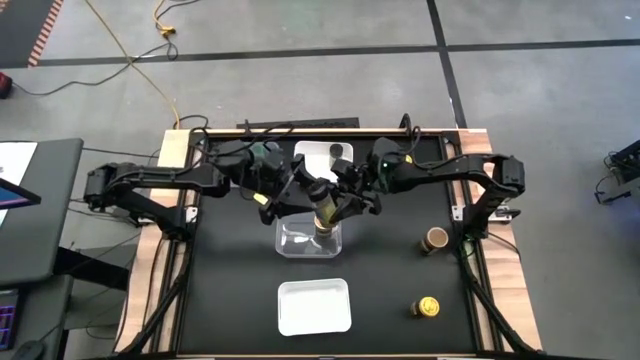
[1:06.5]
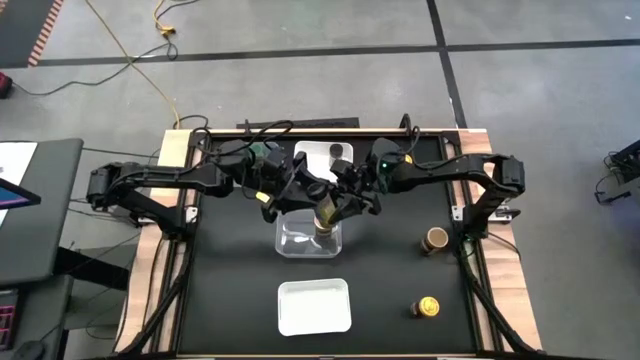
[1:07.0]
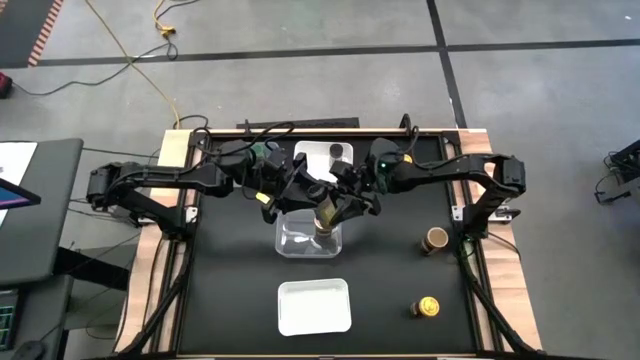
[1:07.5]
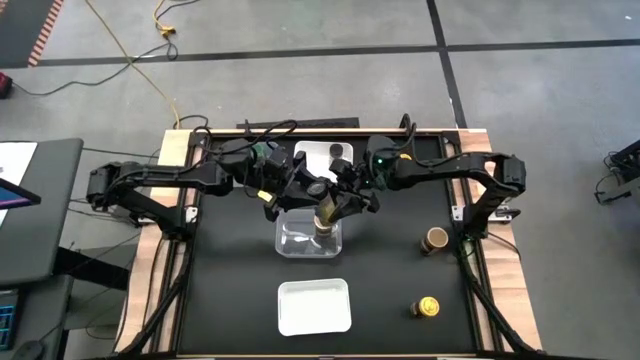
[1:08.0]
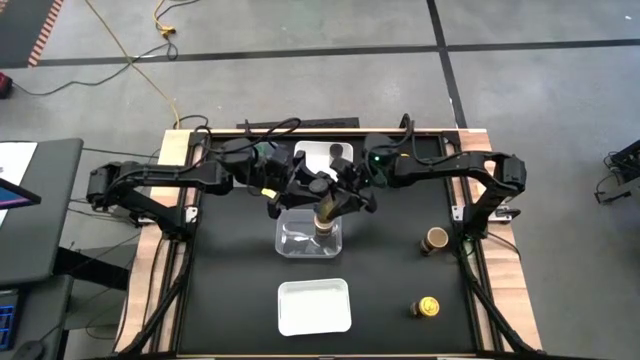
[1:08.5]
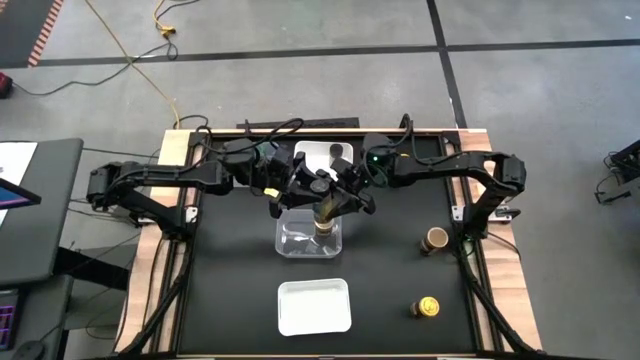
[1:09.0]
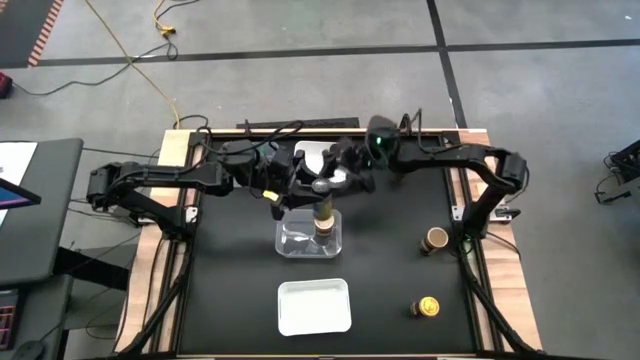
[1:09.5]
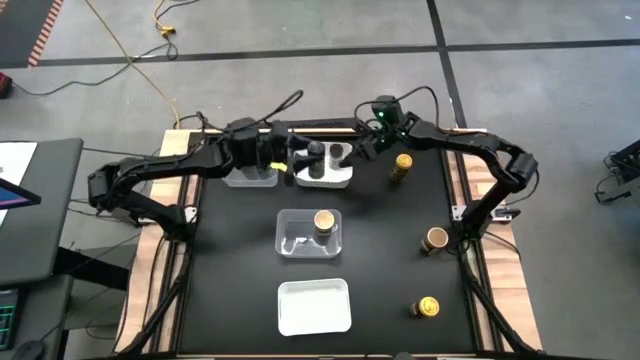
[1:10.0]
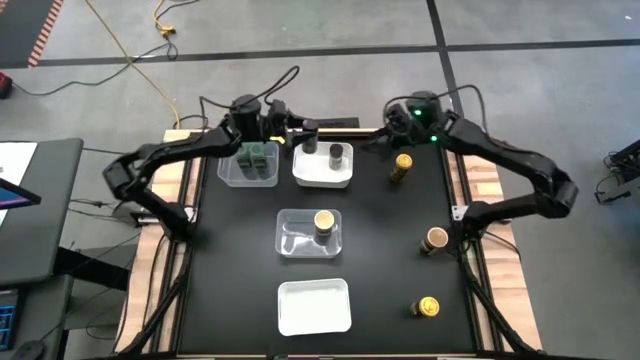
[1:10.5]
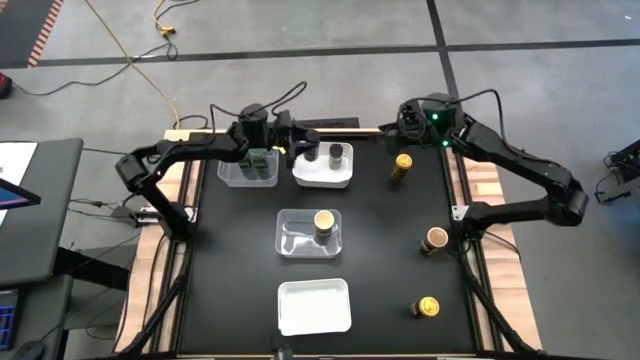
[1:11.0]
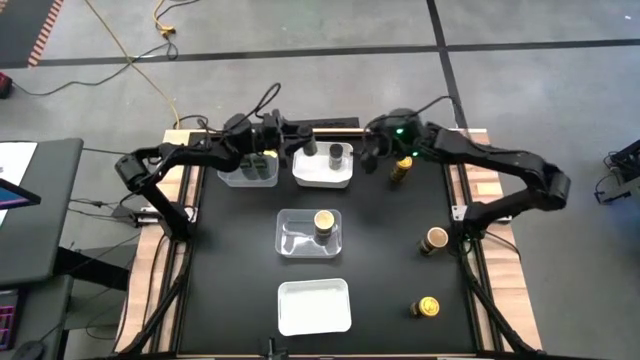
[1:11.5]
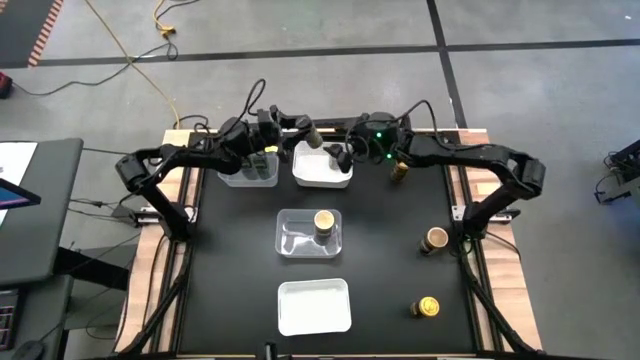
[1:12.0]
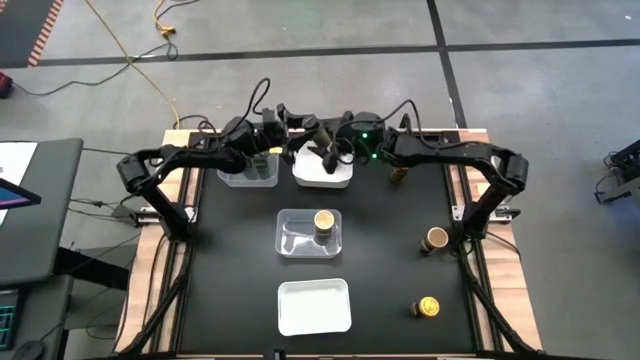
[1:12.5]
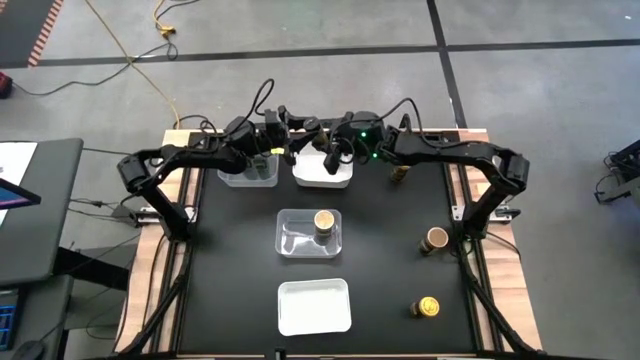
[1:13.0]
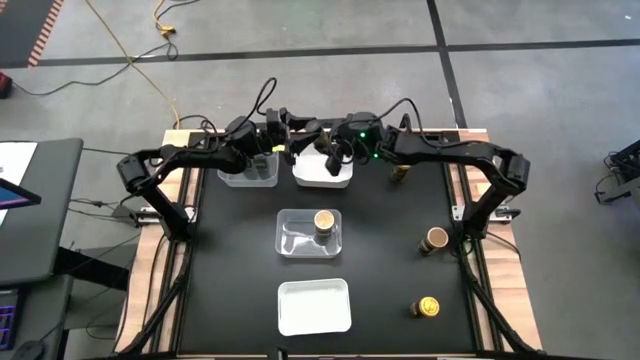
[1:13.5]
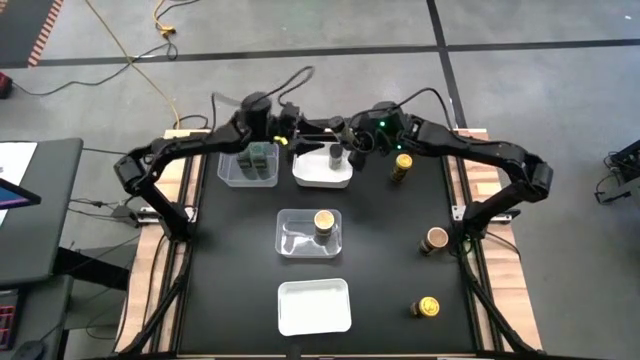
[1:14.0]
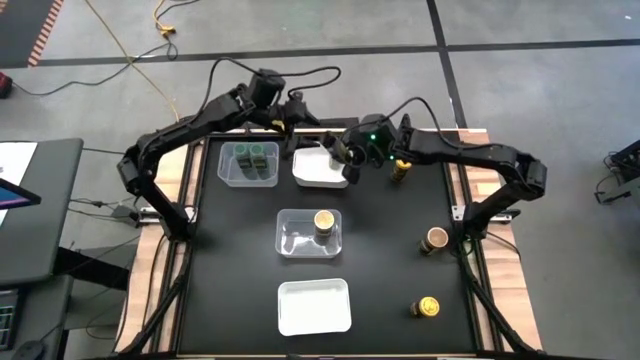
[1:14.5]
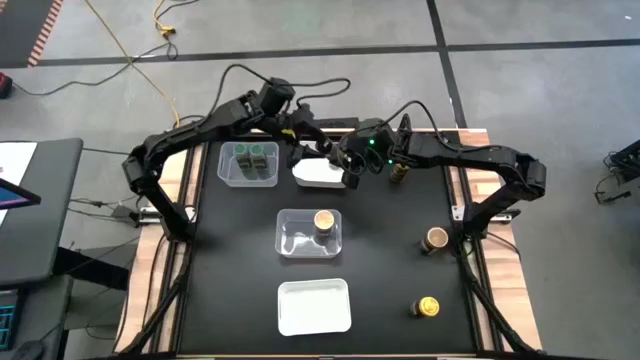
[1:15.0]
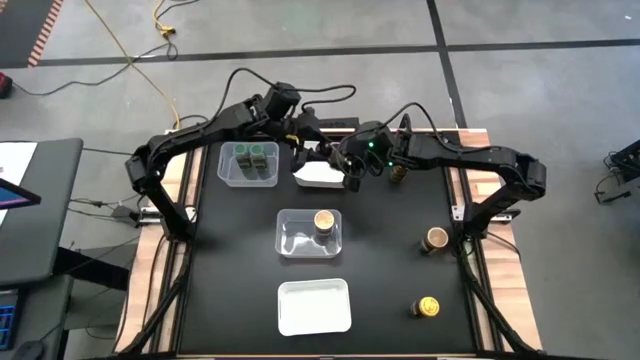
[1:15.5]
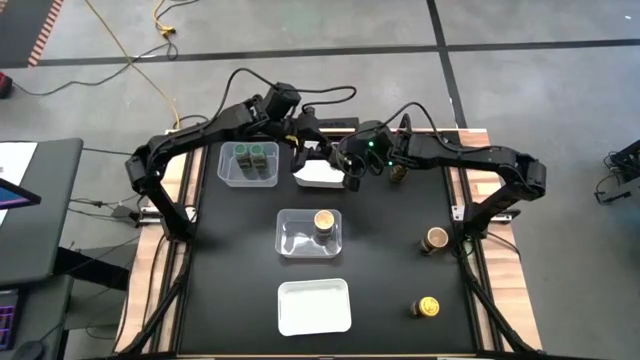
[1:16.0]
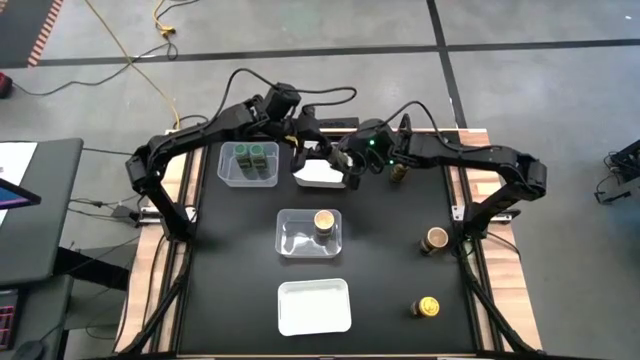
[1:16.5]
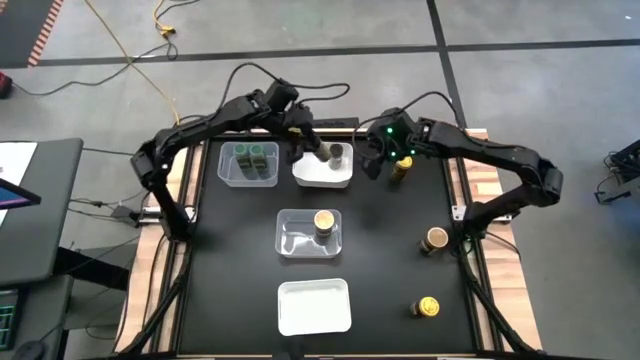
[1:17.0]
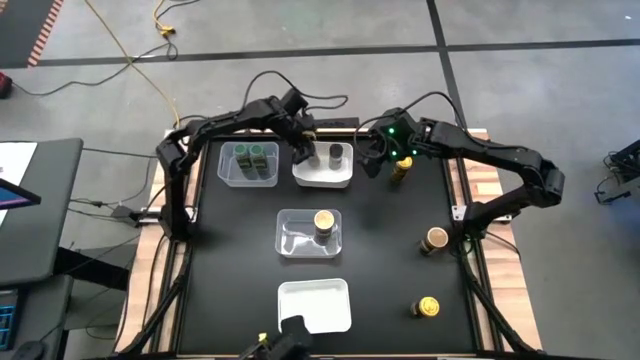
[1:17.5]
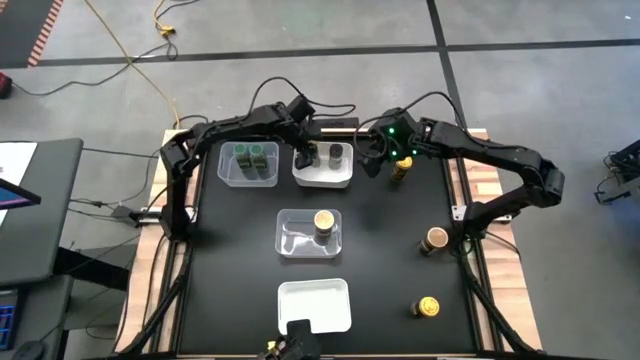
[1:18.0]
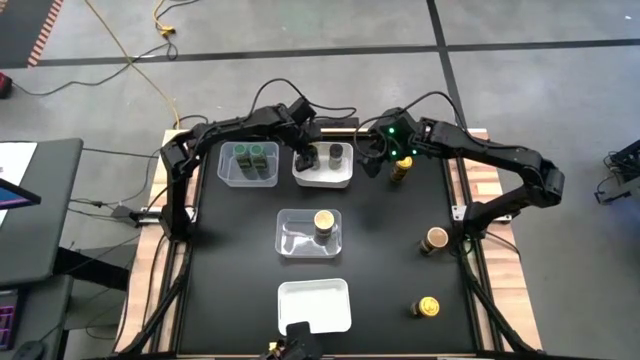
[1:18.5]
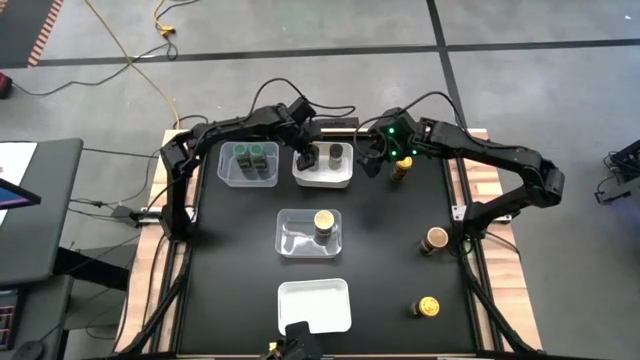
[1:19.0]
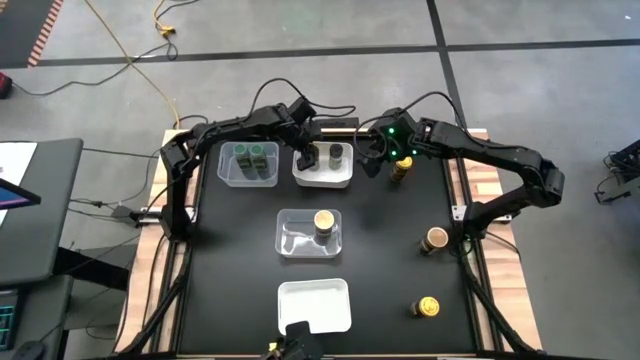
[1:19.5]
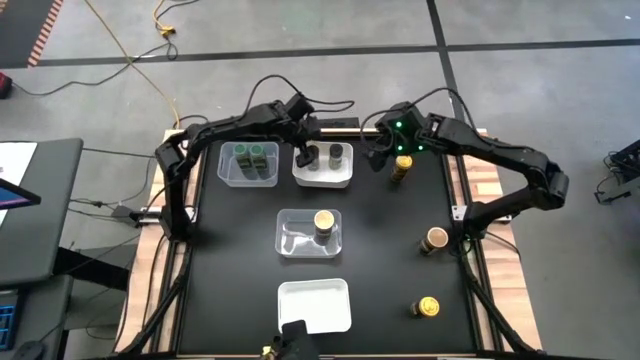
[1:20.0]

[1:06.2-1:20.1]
Task: Sort spices by type
Put the black seasoning bottle into the top white bin

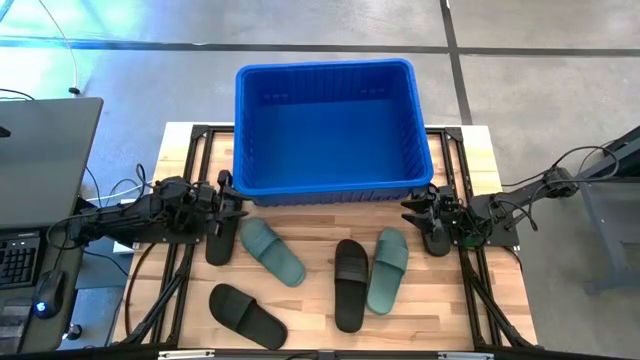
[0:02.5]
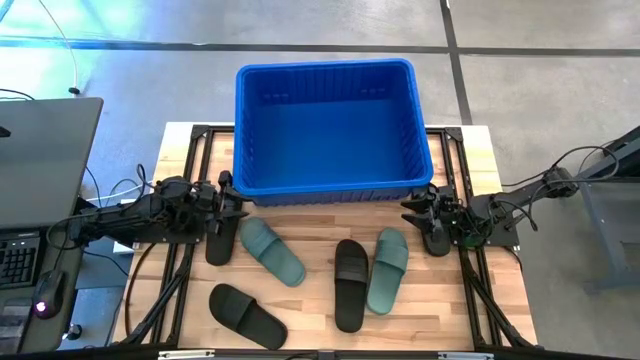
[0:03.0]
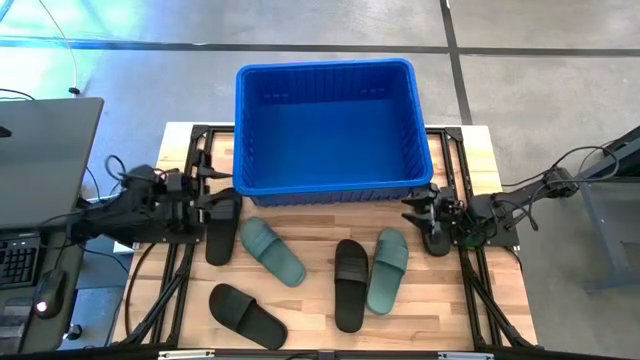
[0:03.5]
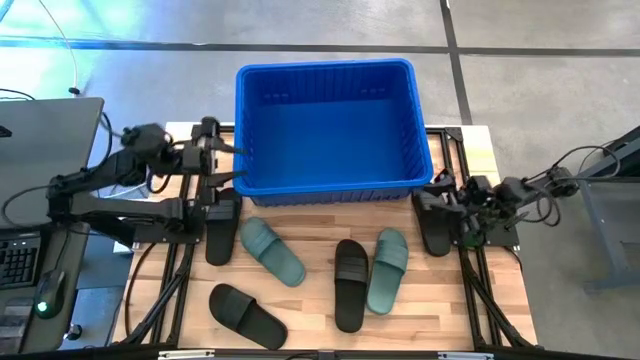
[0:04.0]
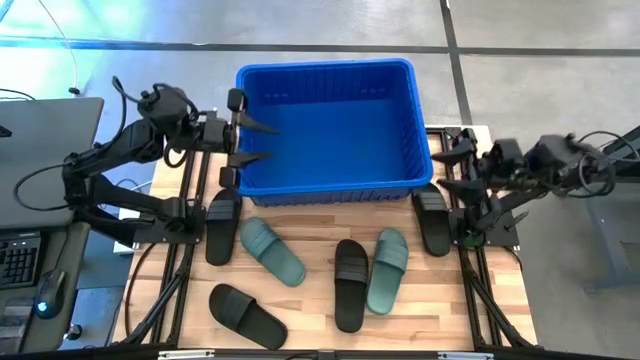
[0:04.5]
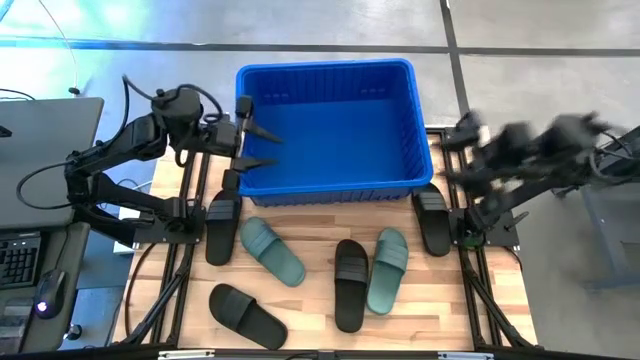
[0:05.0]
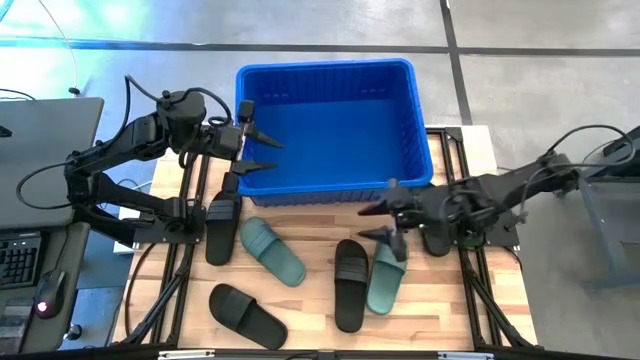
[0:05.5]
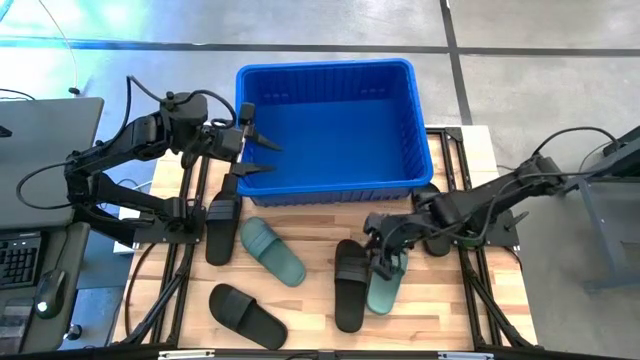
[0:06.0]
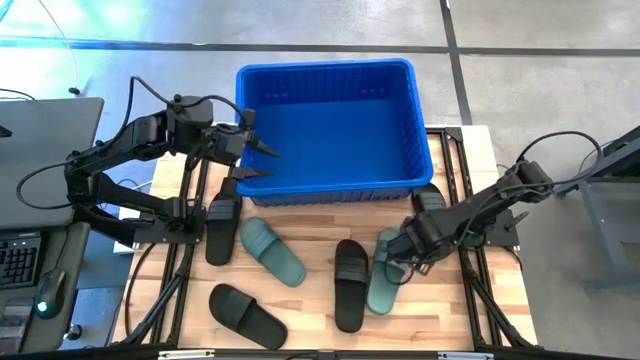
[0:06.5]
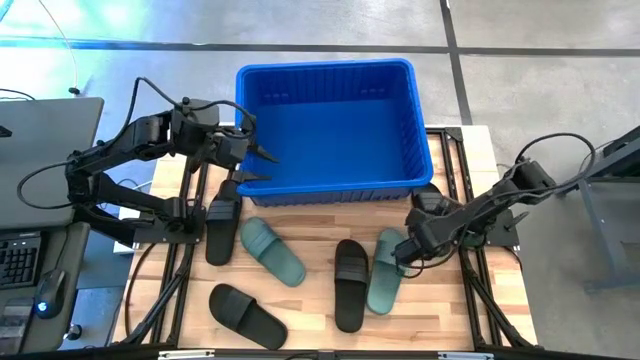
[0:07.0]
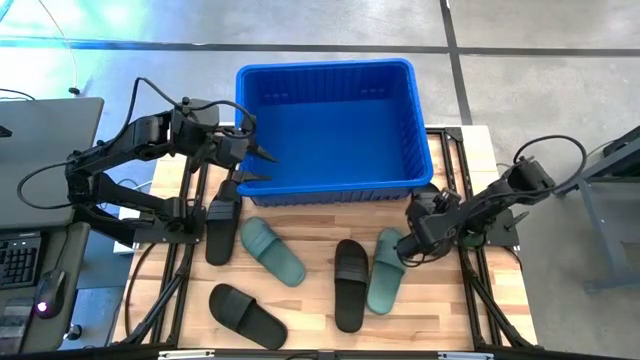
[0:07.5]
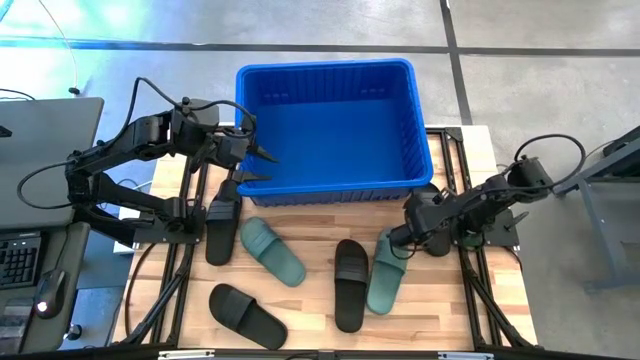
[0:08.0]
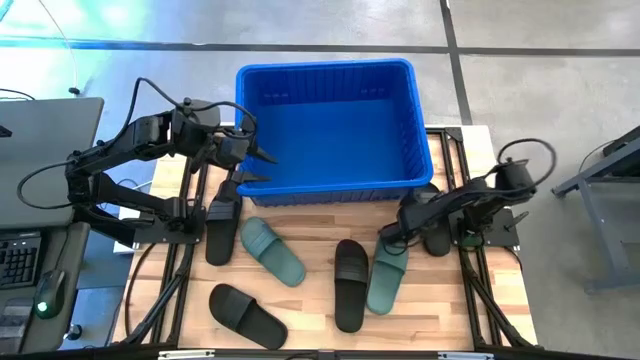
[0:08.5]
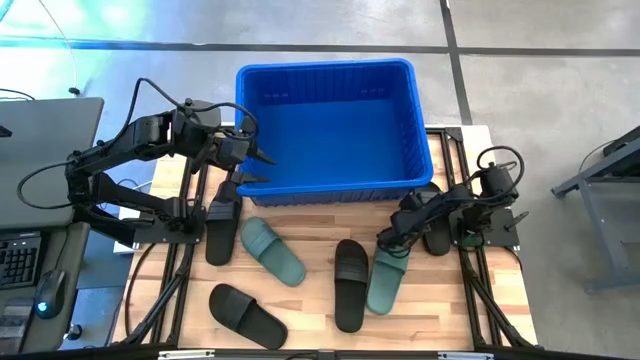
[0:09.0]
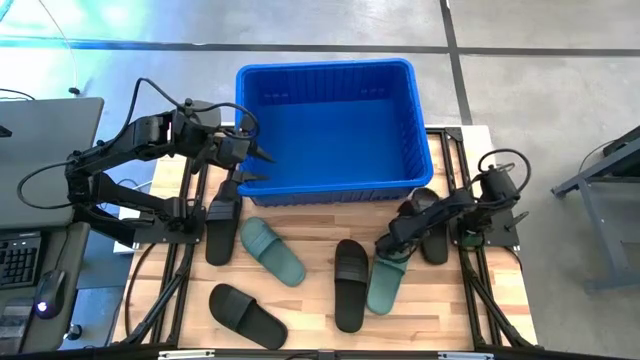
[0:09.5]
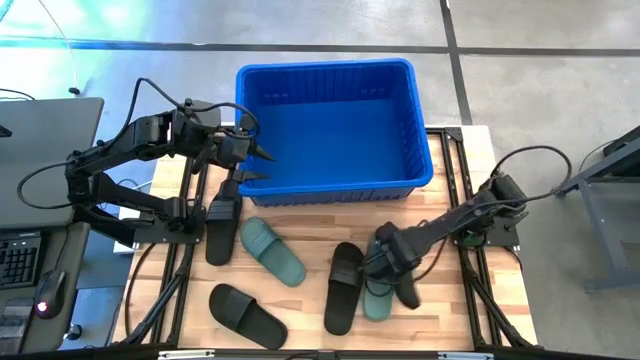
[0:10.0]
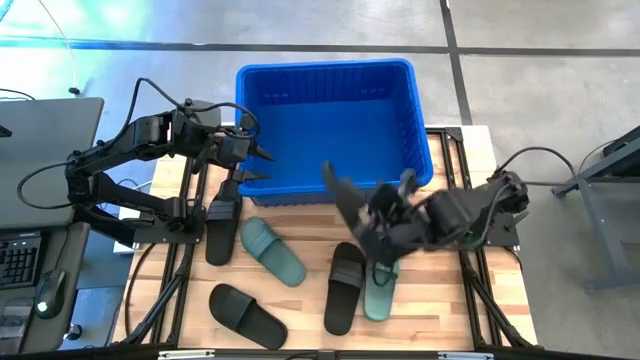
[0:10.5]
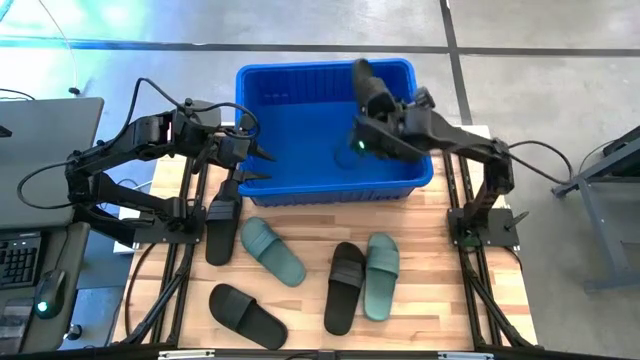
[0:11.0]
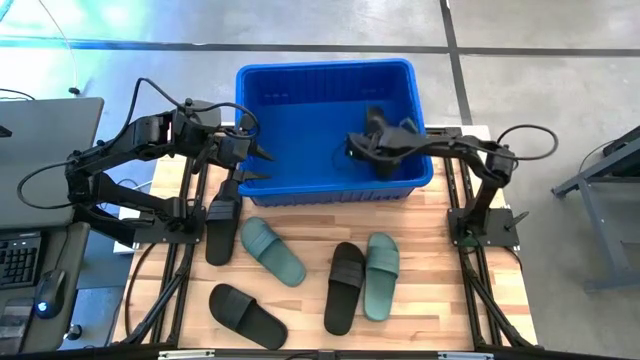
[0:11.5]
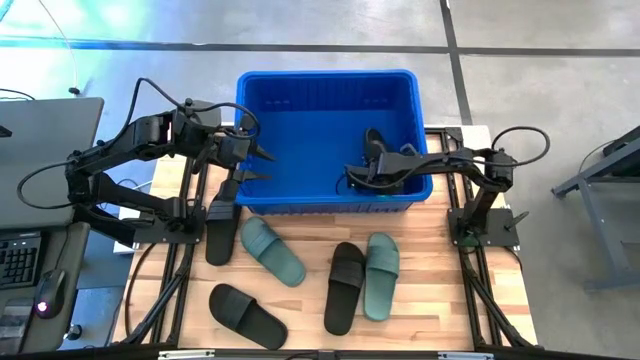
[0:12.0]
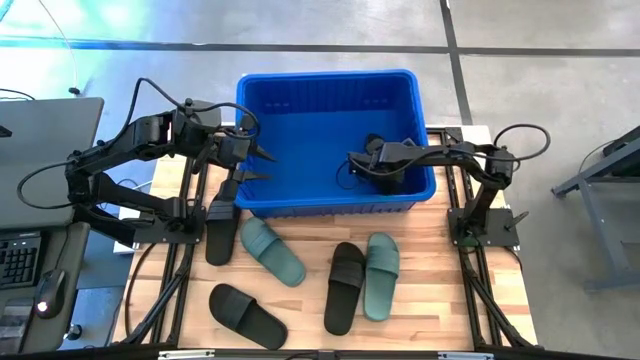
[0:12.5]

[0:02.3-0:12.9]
Task: Pick and place slides into bin
Put the black slide into the blue bin
